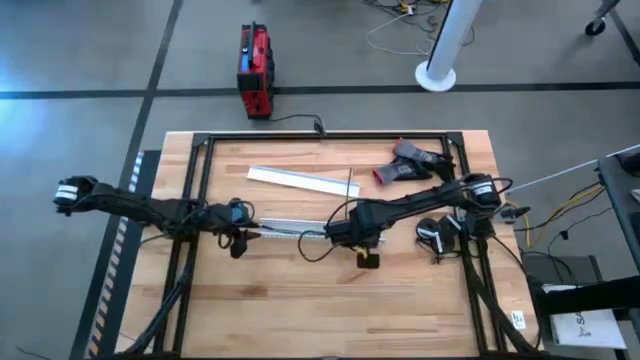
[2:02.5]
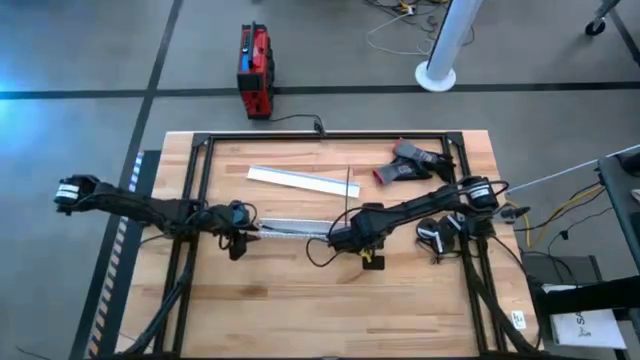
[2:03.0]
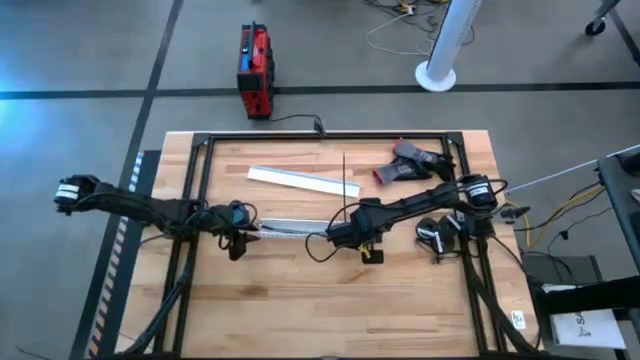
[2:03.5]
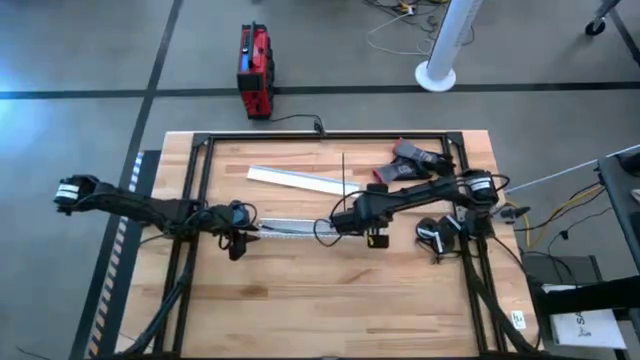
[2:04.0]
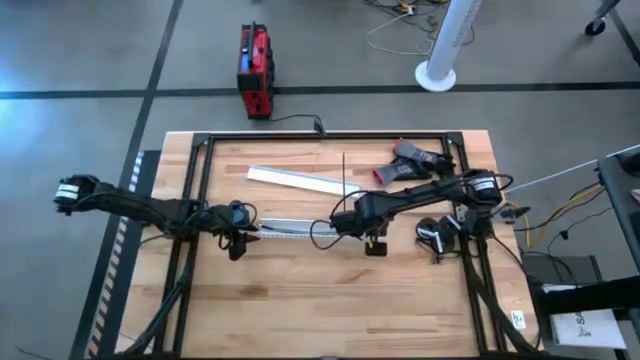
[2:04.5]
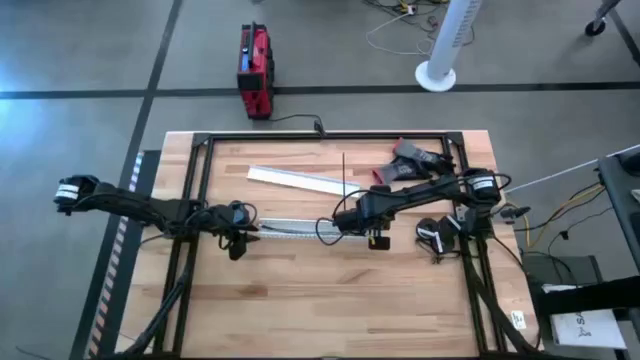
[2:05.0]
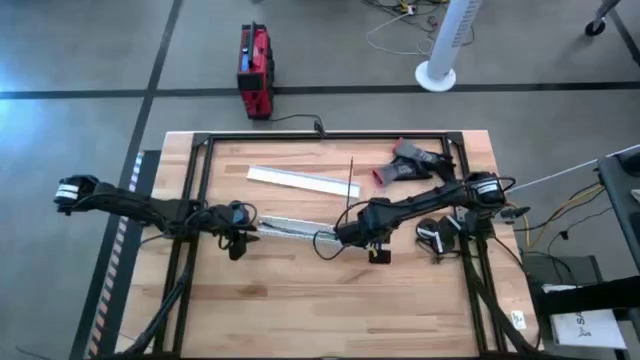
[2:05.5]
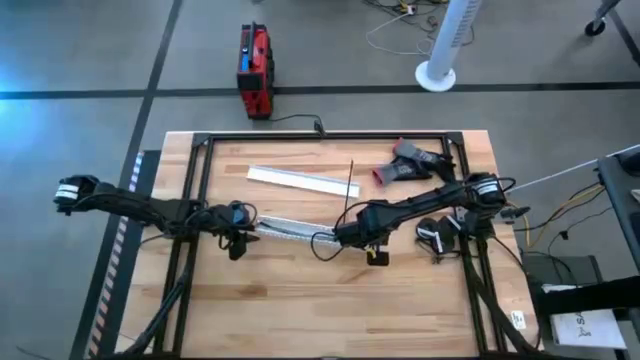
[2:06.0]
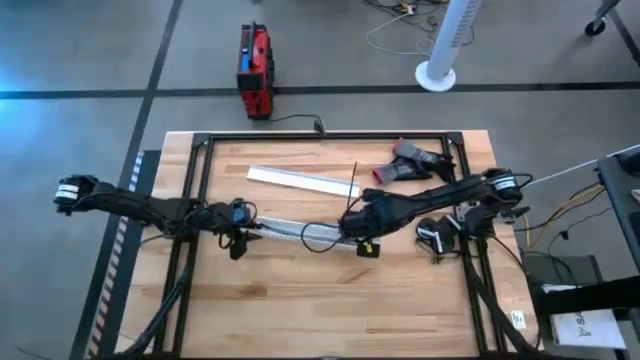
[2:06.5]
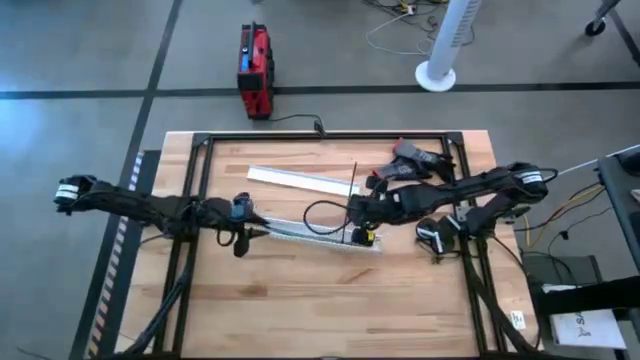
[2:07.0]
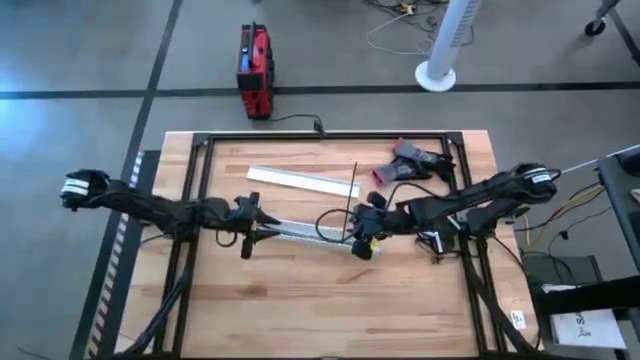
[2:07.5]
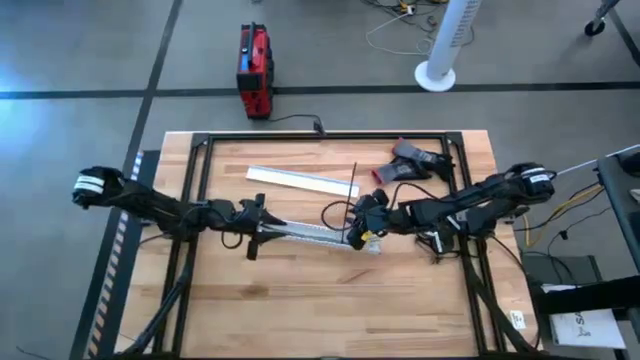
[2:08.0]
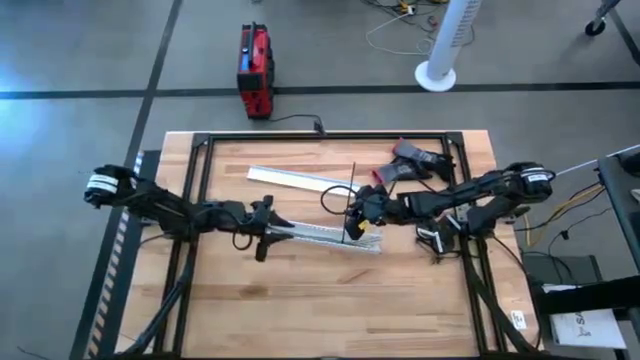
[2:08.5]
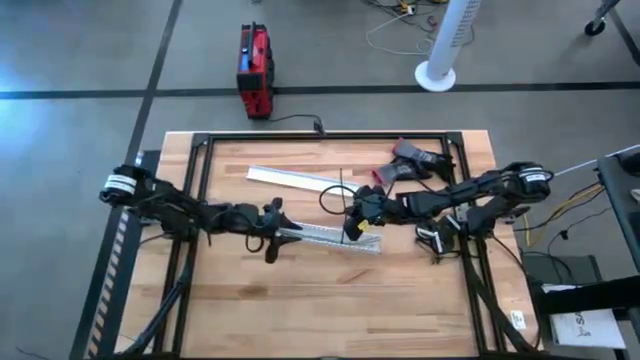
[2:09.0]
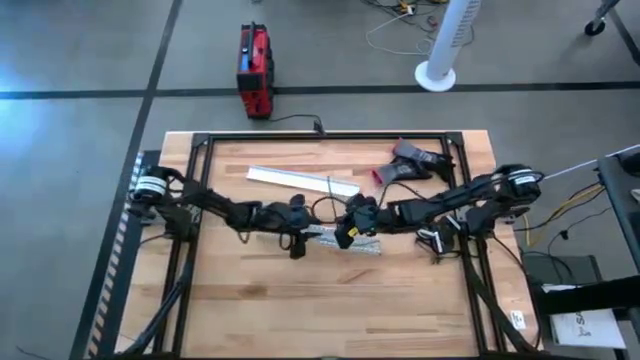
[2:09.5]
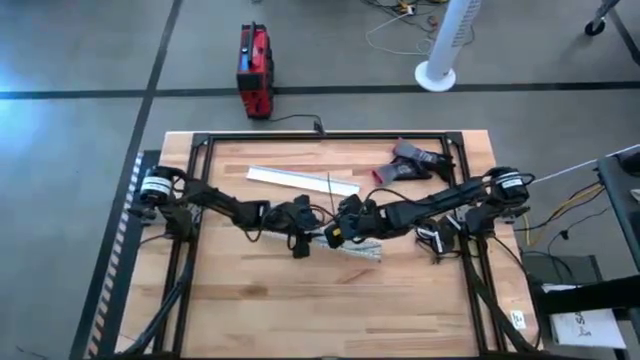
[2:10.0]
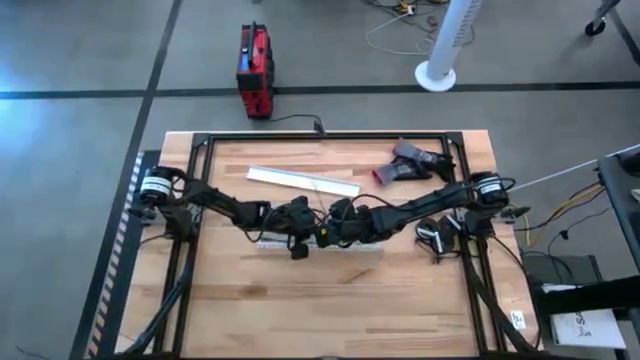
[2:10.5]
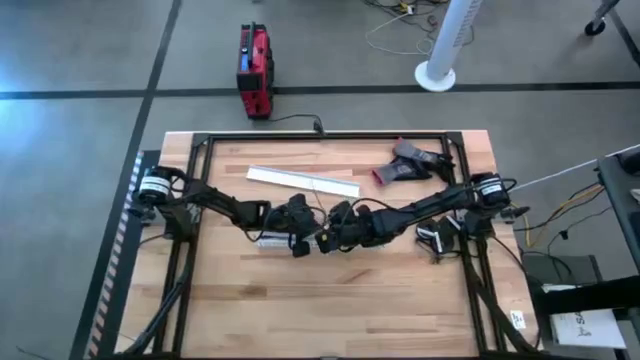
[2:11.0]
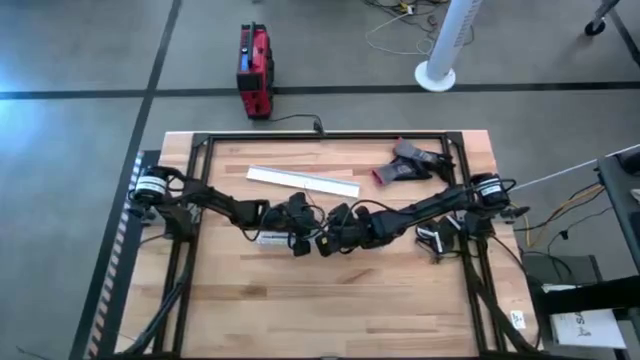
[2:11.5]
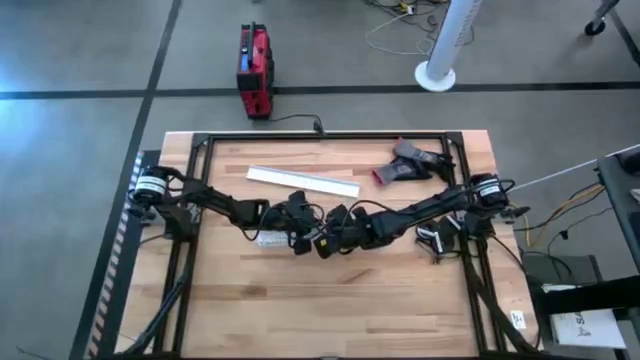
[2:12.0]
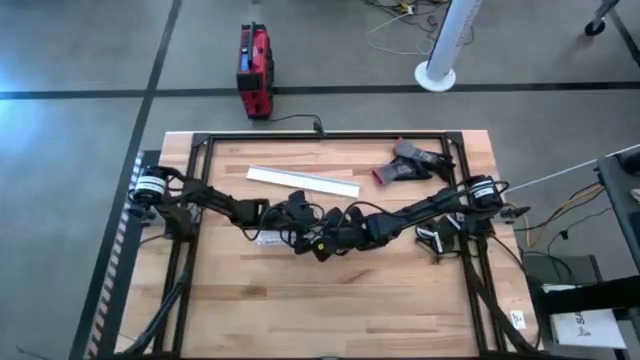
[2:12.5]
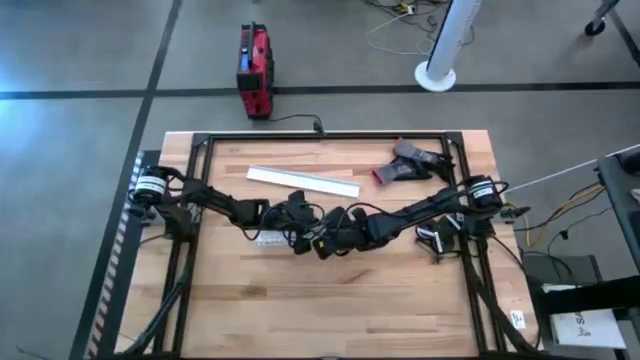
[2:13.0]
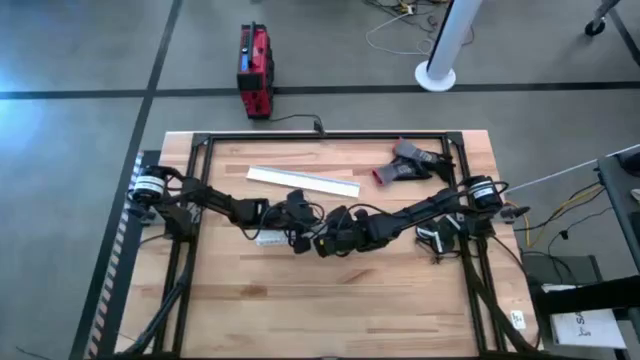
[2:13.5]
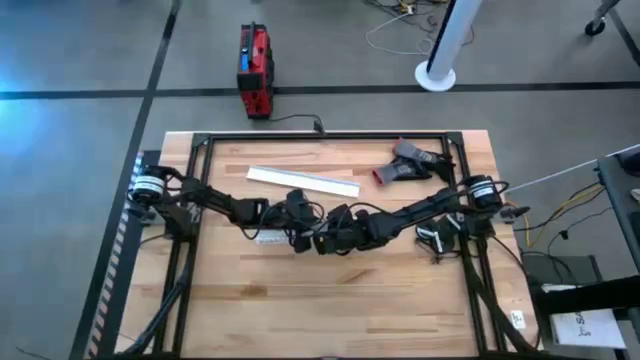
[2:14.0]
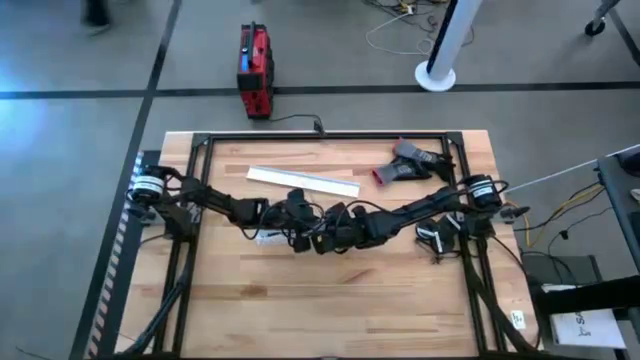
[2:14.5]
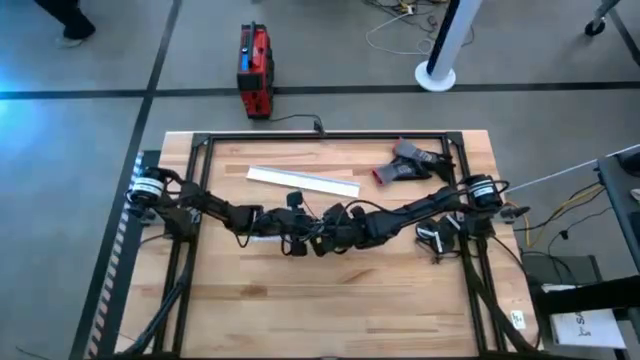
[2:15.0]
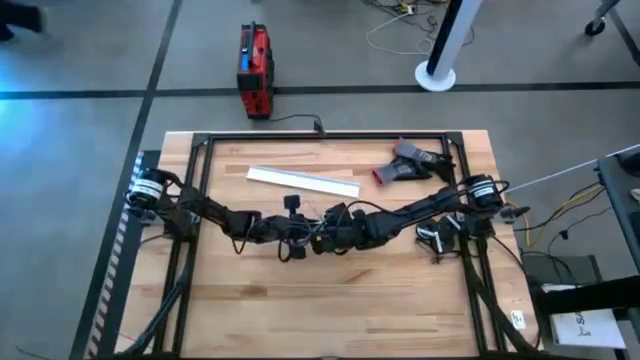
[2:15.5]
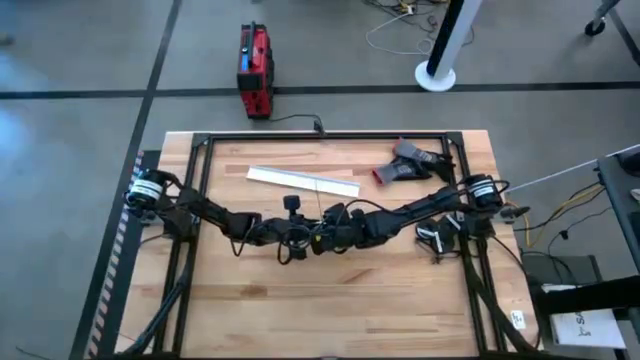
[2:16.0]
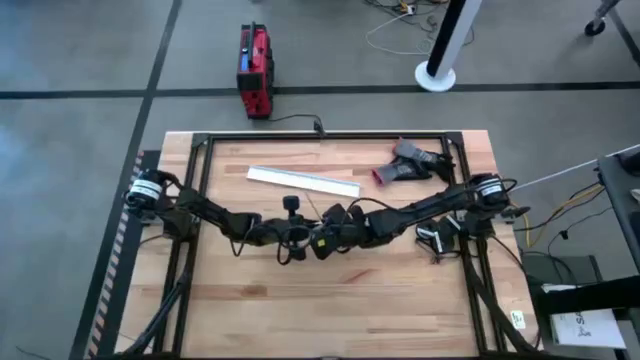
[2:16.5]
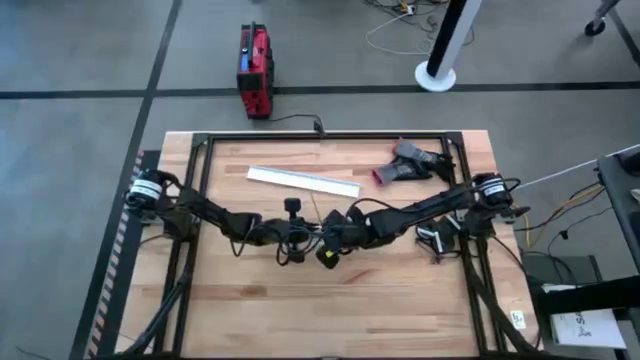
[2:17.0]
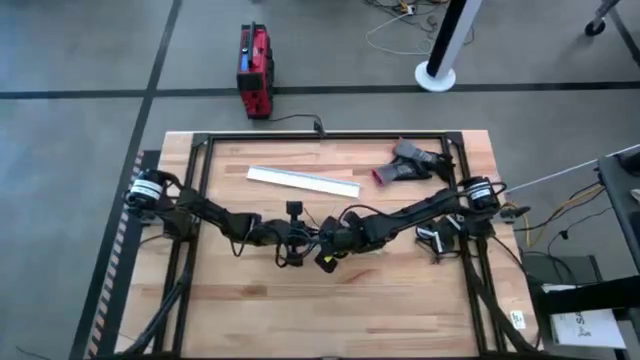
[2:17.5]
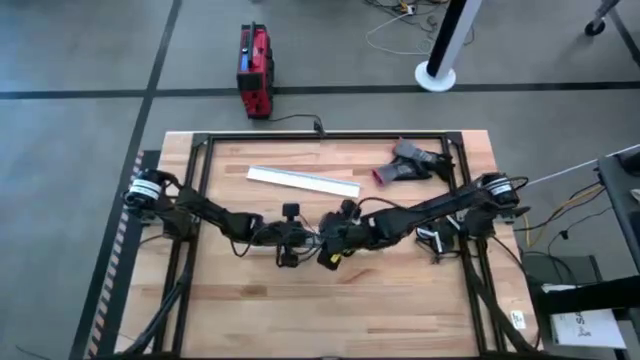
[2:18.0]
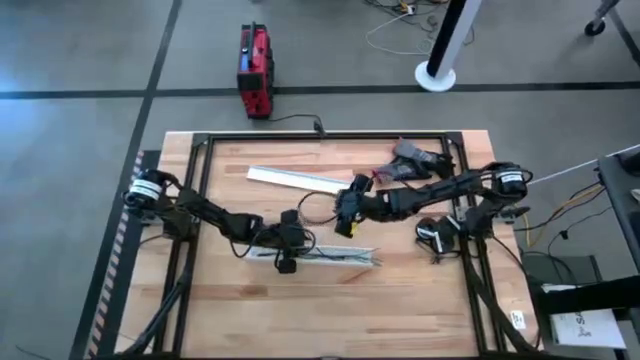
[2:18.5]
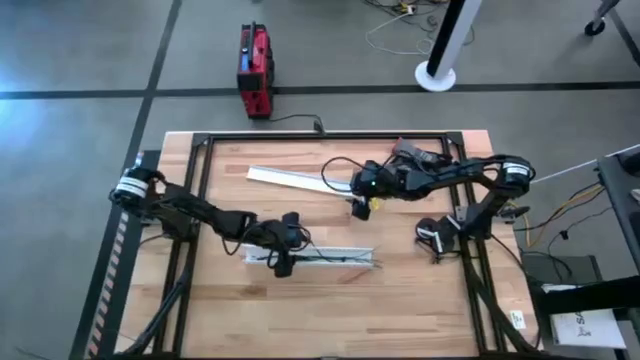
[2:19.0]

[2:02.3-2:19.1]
Task: Ziptie cables
Put the cable wires with a zip tie into the white cable duct

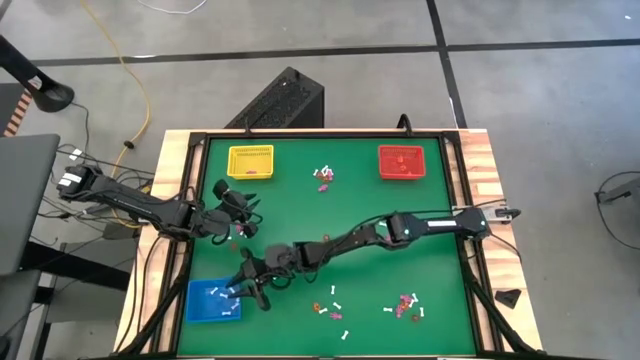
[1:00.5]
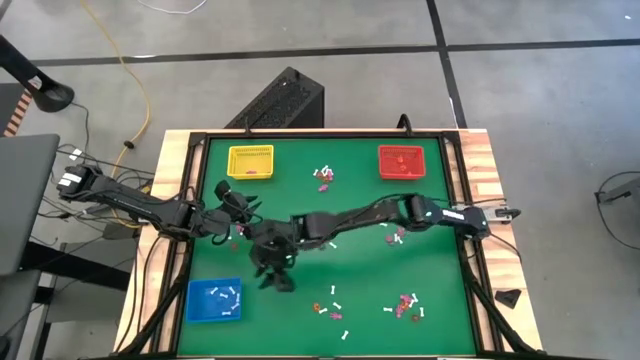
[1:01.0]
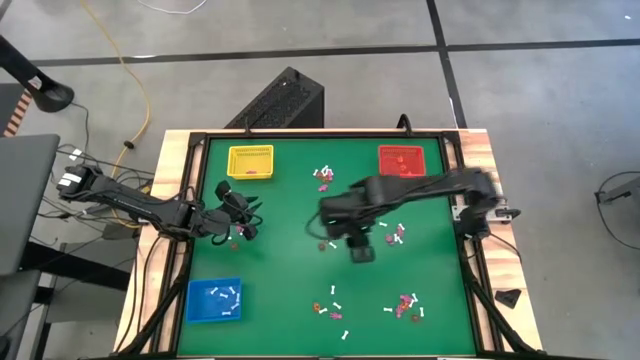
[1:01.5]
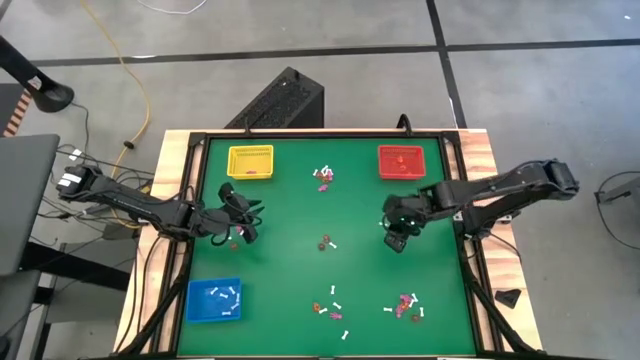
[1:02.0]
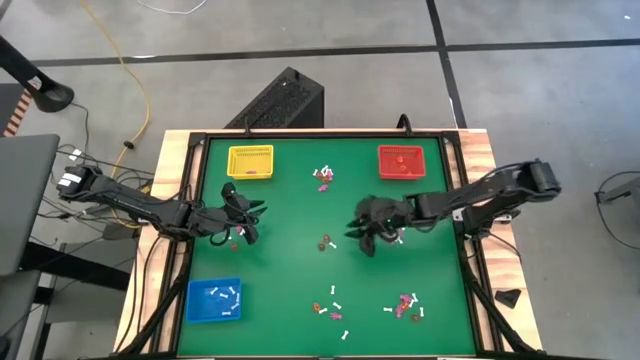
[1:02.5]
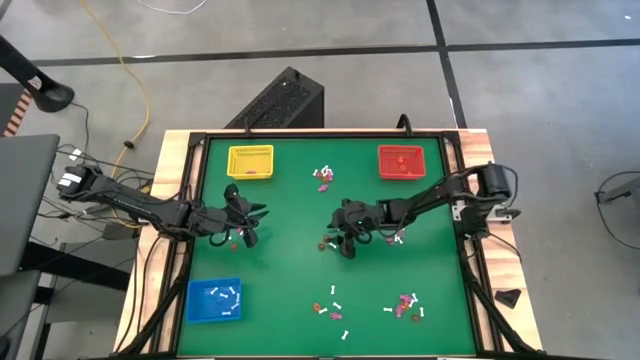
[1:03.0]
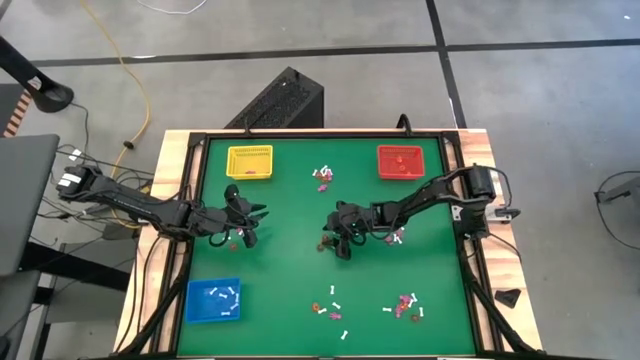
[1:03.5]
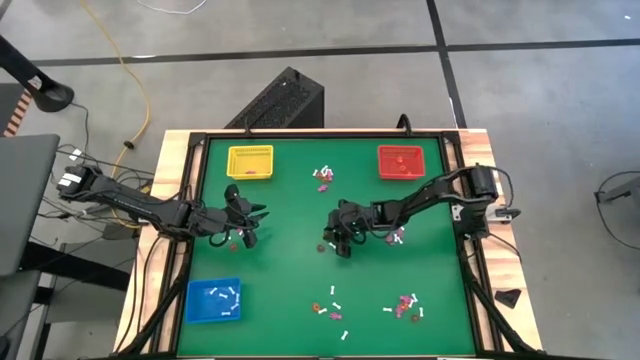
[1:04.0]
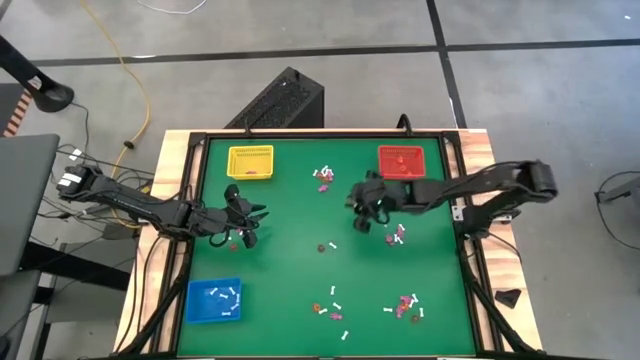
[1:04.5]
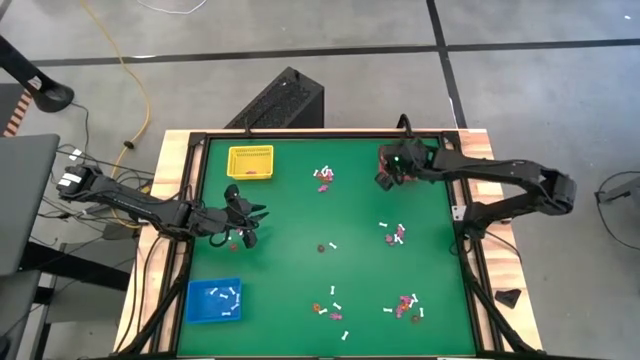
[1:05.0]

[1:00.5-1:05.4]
Task: Sort Halloween decoration
Put the pumpkin toy into the orange bin
